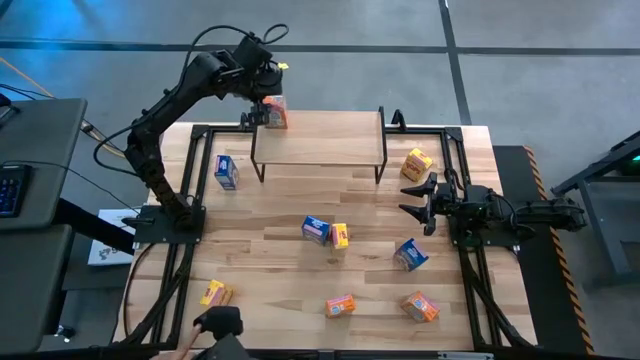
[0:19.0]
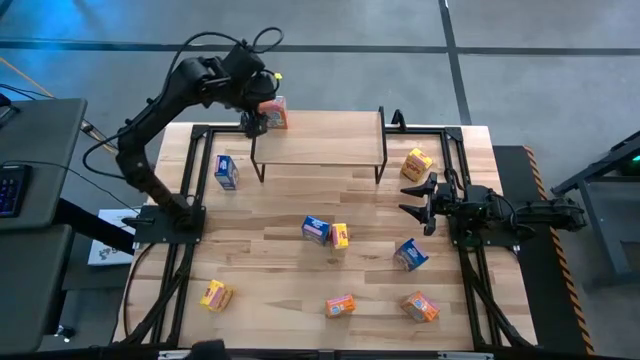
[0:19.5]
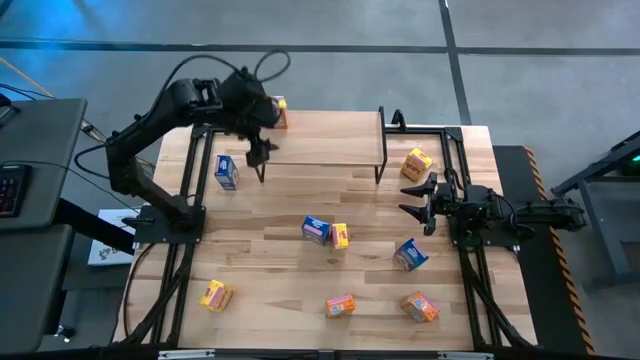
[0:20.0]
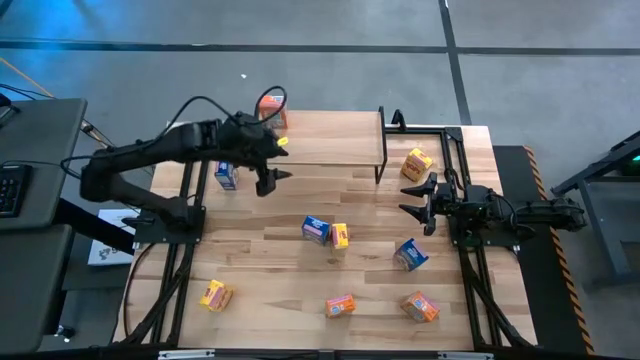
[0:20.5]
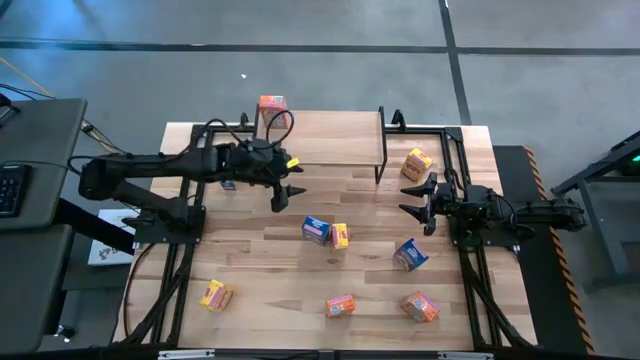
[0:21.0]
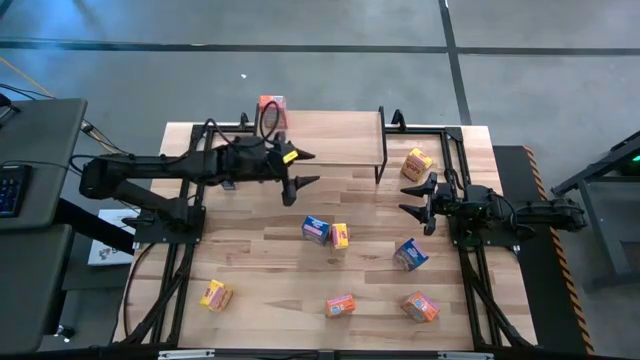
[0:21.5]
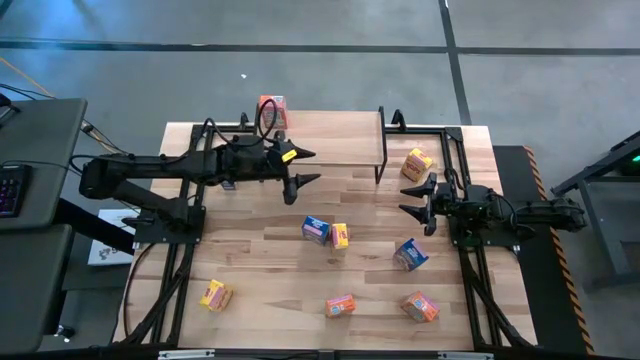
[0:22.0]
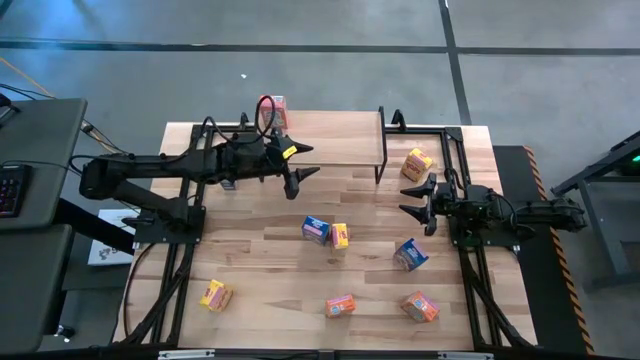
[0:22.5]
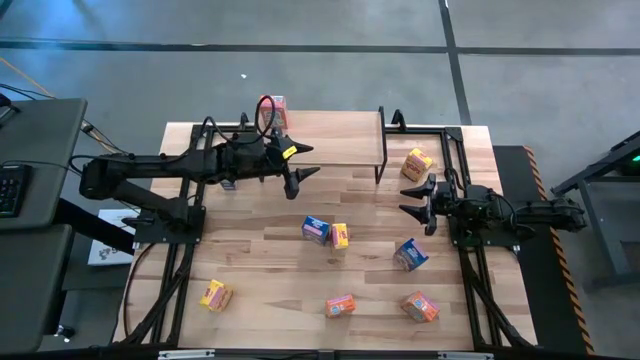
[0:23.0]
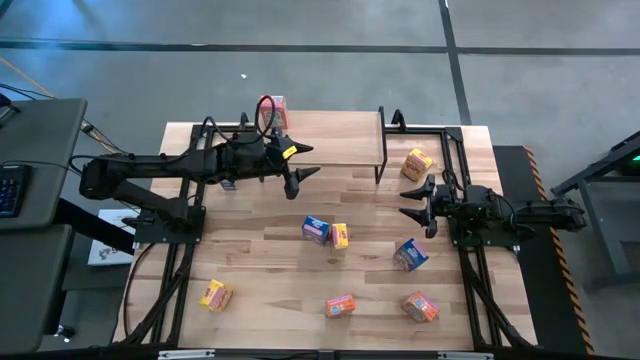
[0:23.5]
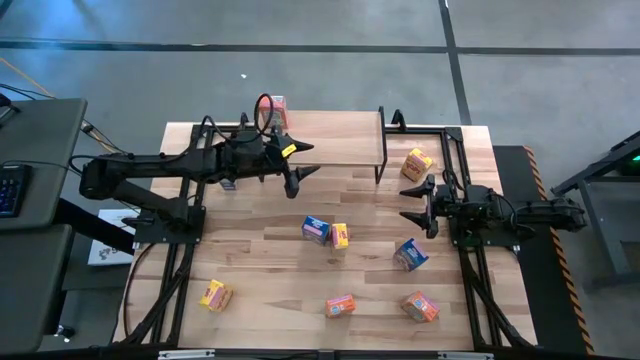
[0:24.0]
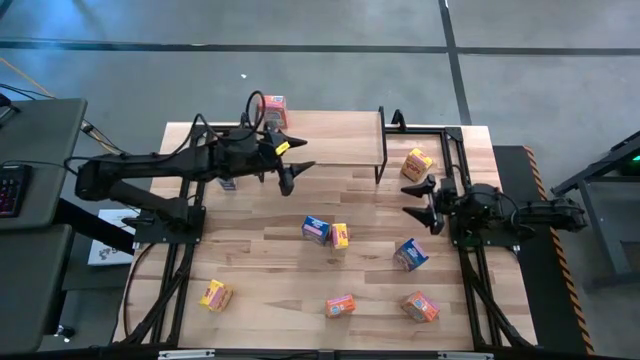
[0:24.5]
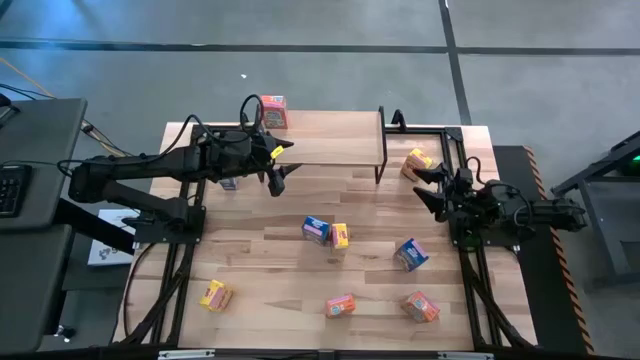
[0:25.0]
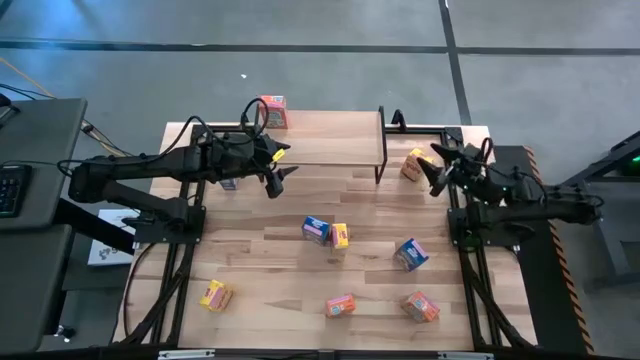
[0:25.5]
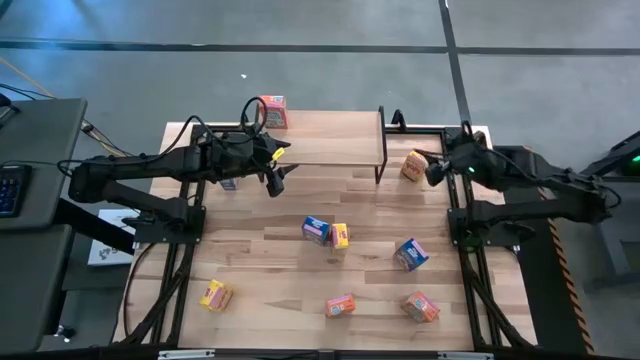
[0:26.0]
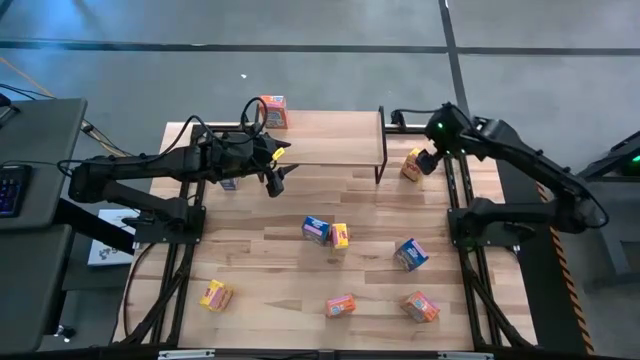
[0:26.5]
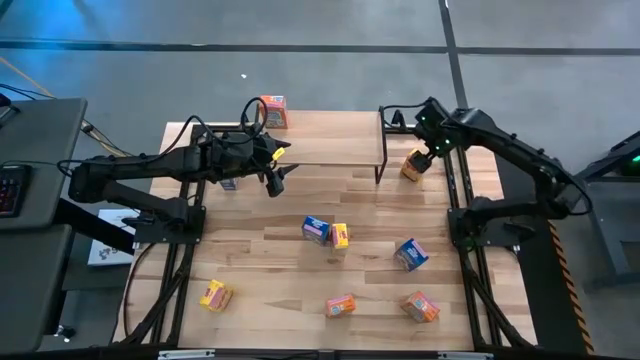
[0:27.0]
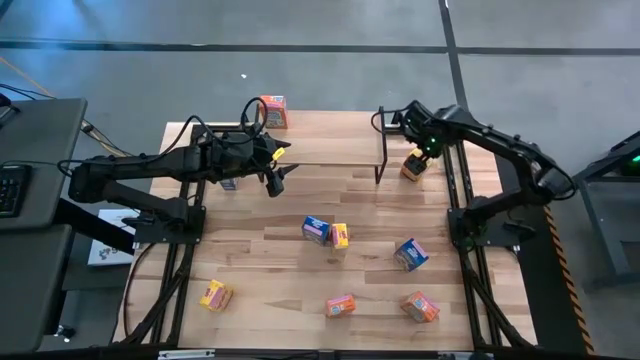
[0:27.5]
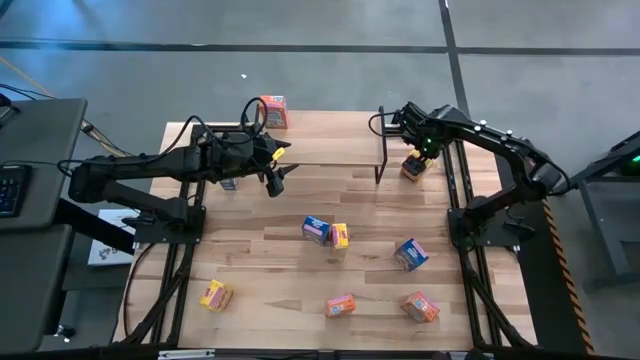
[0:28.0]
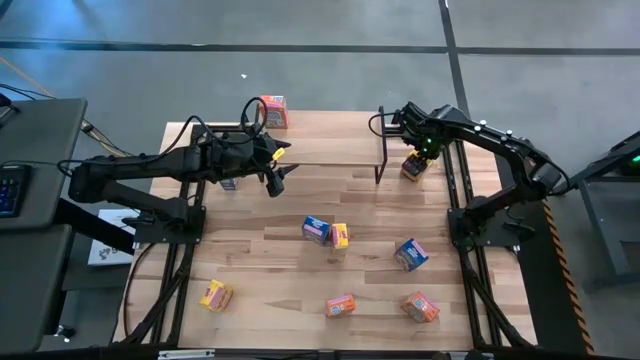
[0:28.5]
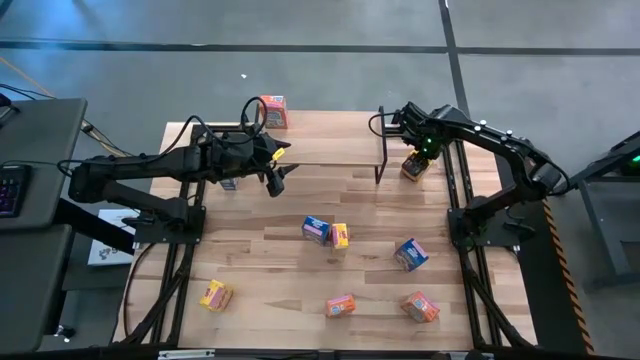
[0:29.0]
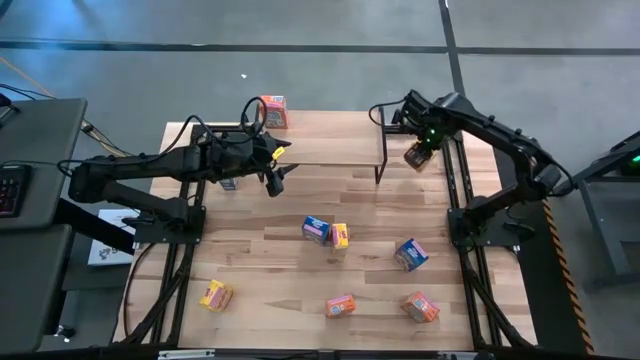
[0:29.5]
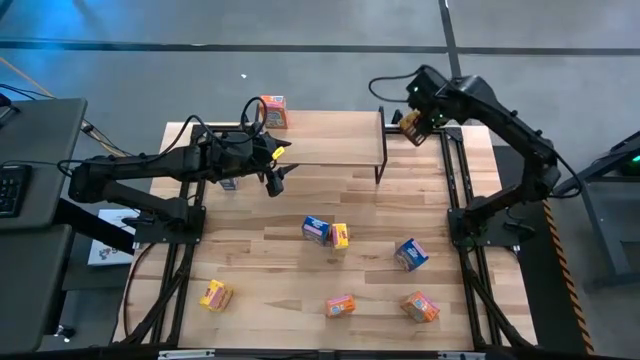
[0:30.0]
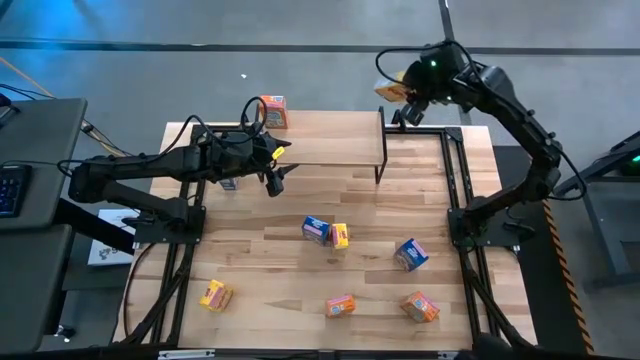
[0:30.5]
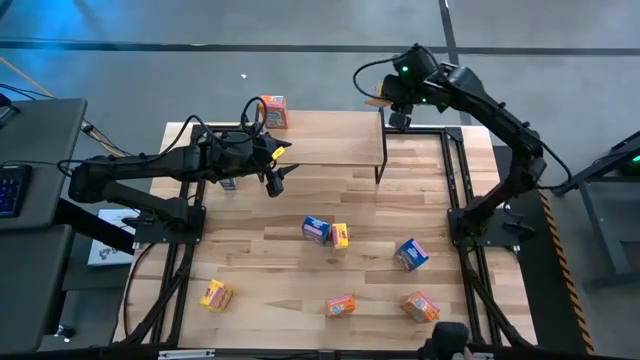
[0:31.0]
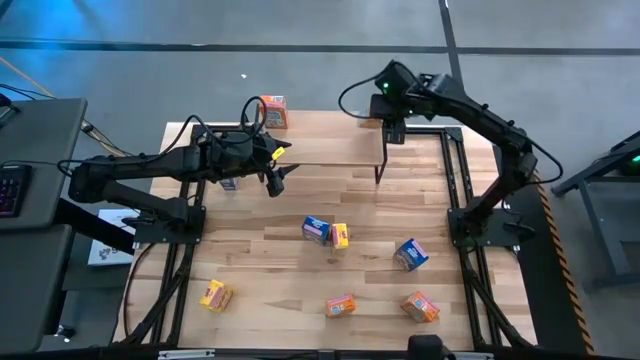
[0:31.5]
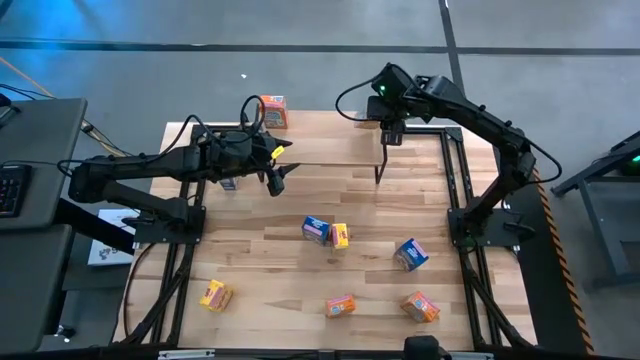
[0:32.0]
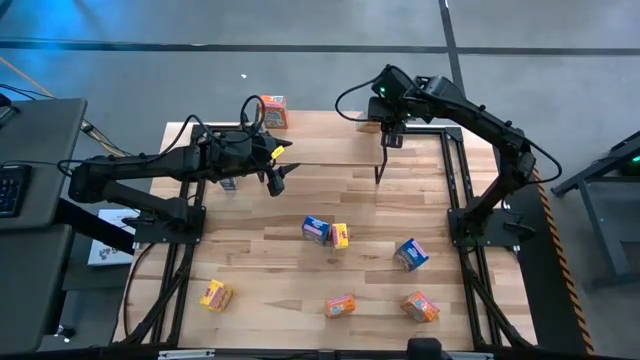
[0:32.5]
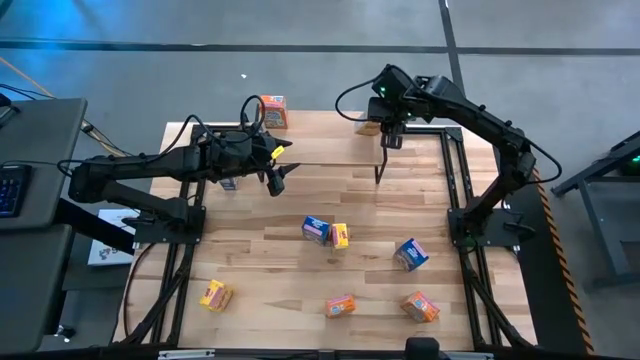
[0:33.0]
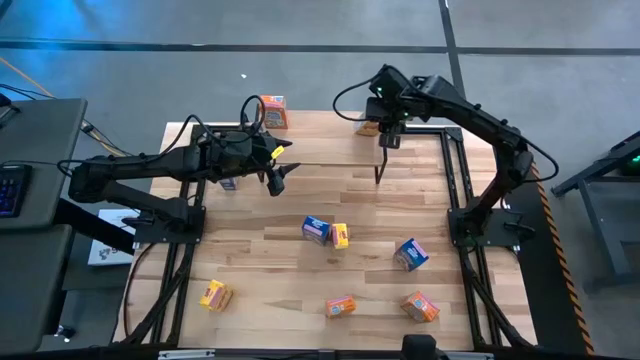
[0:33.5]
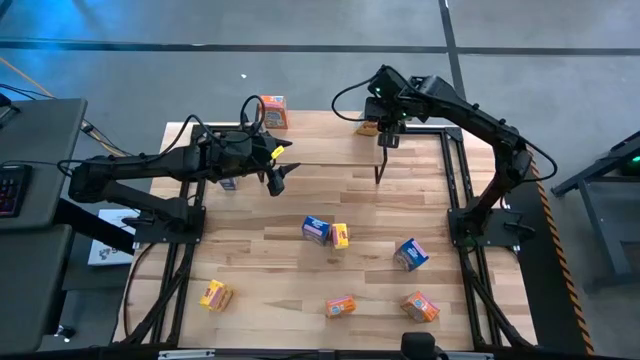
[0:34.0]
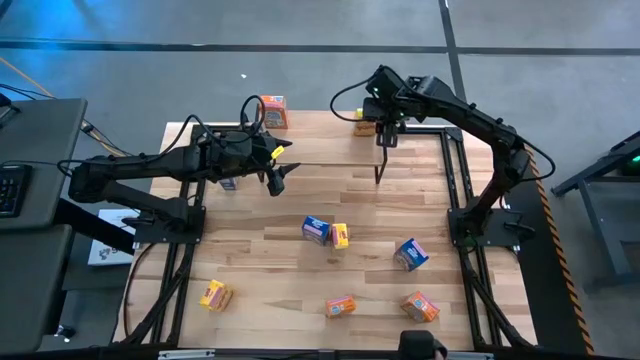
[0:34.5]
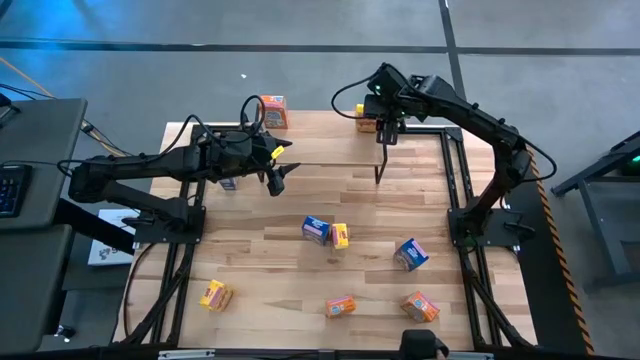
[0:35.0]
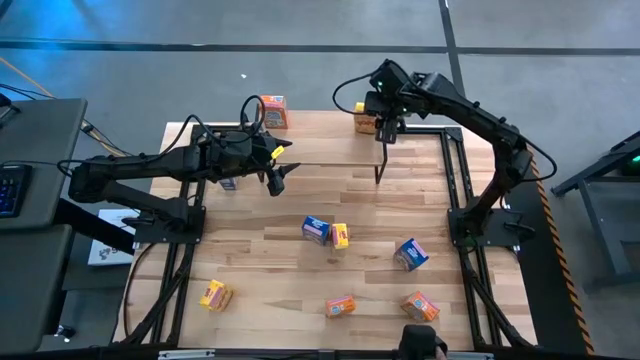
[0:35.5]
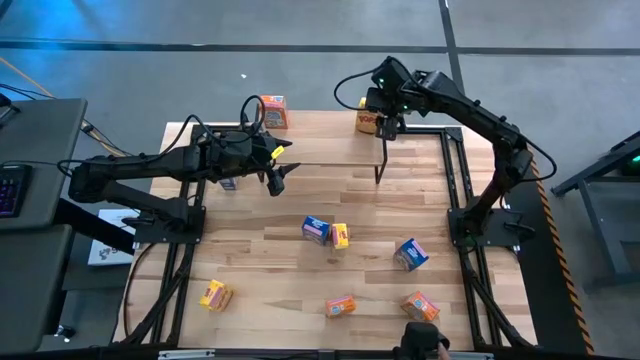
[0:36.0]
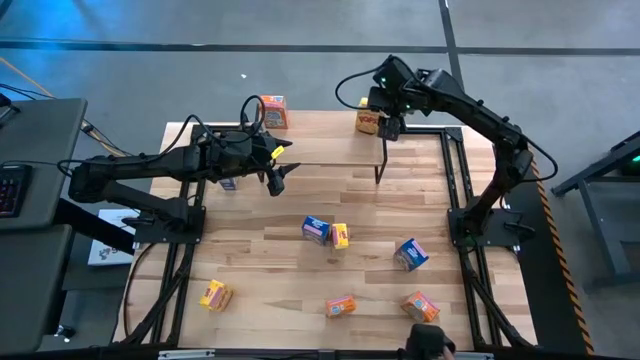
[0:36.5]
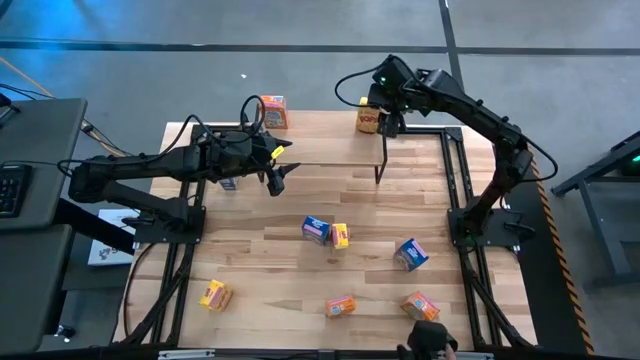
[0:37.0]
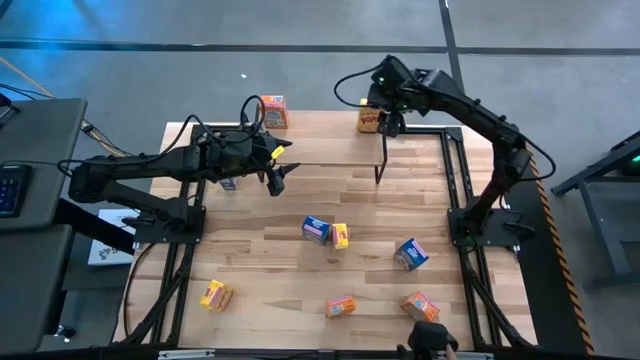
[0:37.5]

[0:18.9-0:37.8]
Task: Stack cereal on shelf
Put the top right yellow cereal box on the shelf

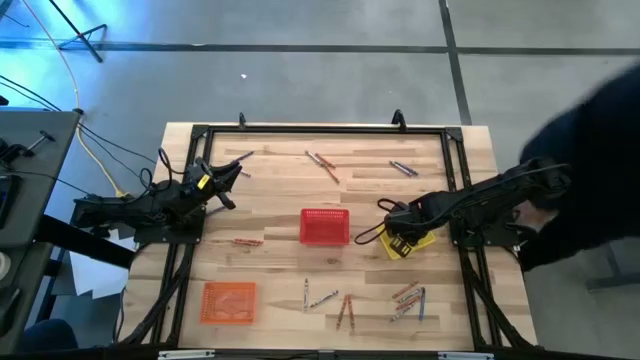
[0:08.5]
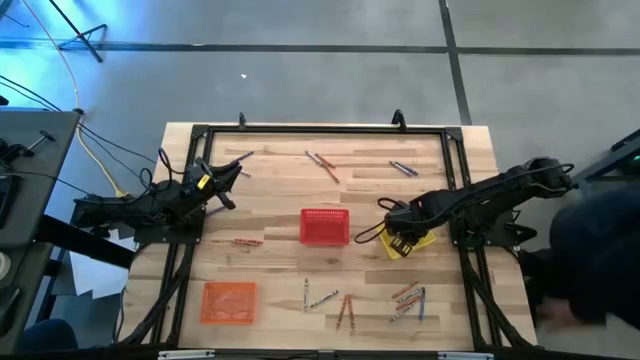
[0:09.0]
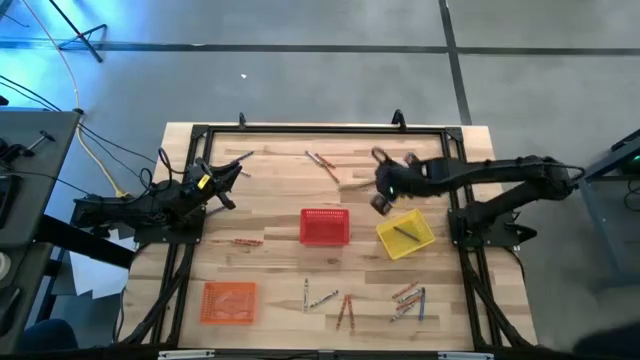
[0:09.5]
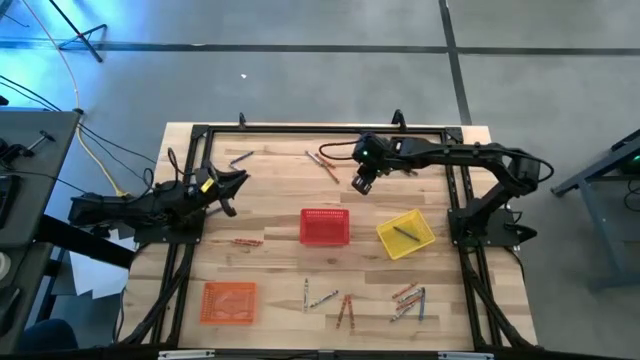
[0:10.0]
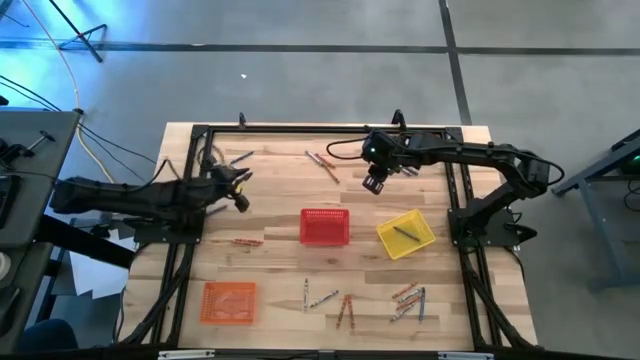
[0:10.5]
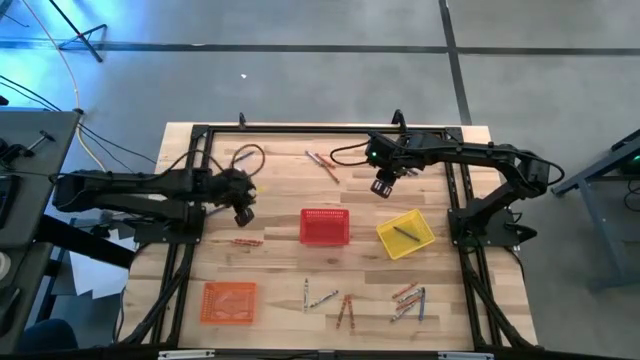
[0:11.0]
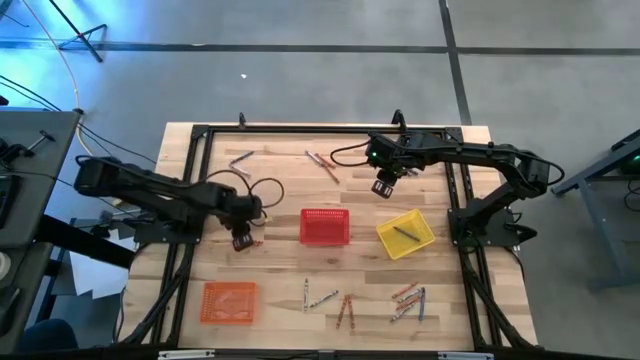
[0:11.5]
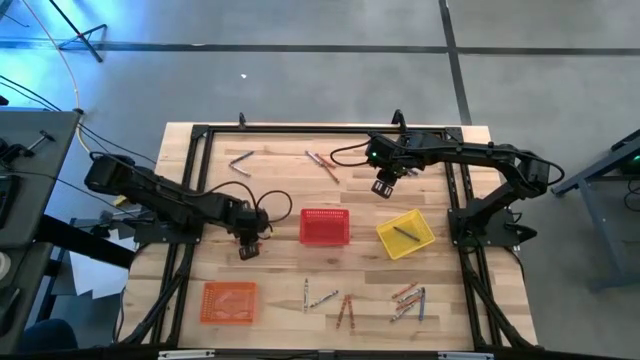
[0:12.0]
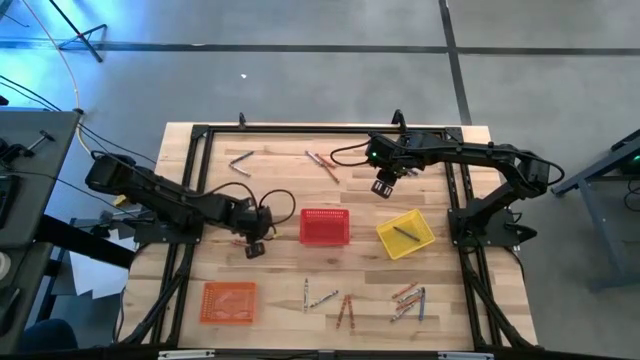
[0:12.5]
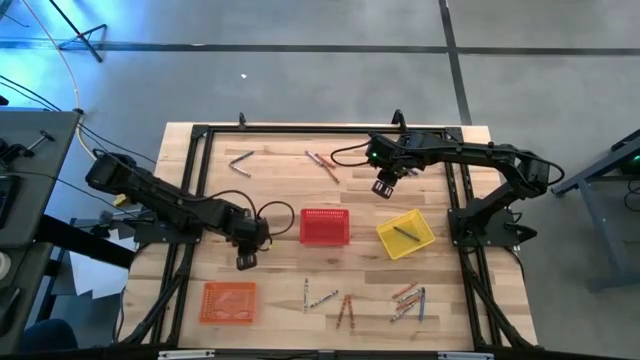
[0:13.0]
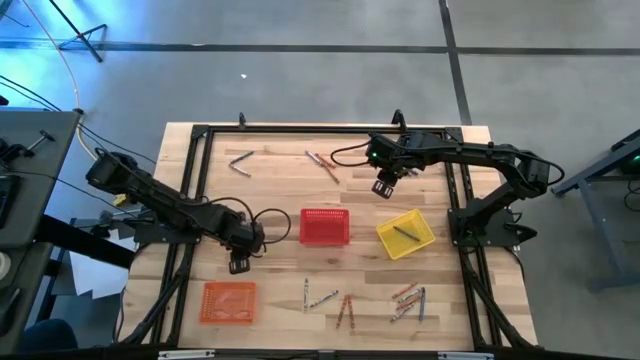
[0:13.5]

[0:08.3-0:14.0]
Task: Sort crayons
Put the orange crayon into the orange bin
